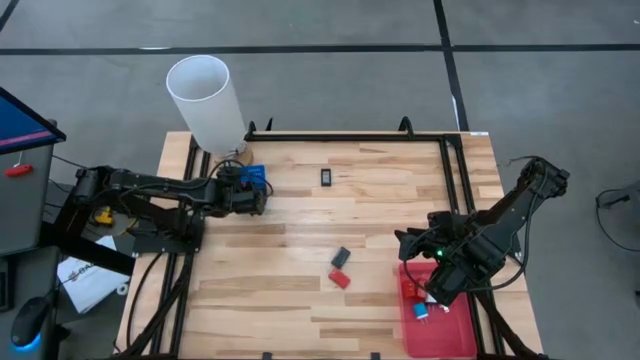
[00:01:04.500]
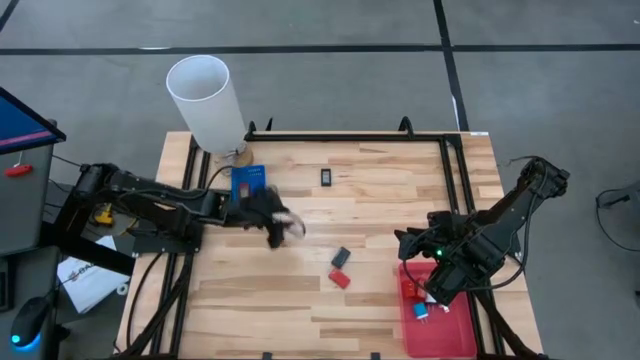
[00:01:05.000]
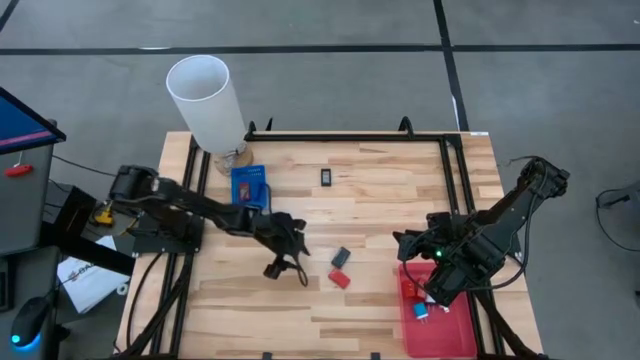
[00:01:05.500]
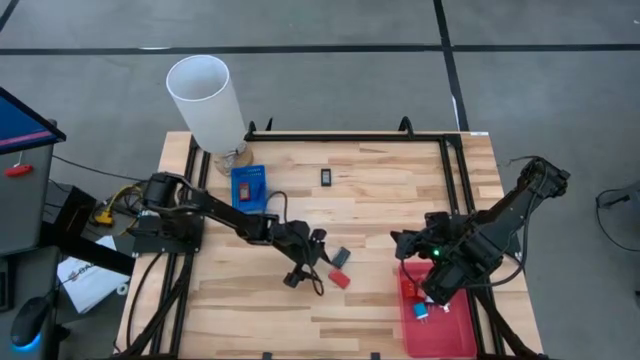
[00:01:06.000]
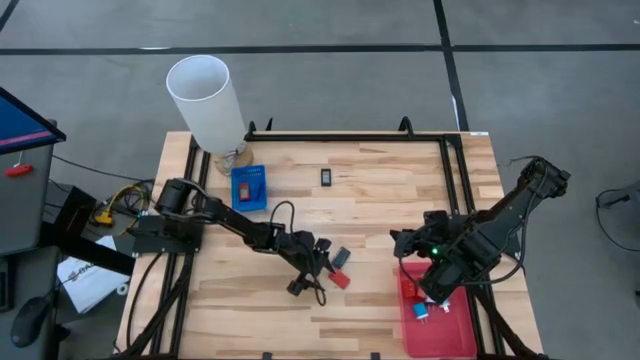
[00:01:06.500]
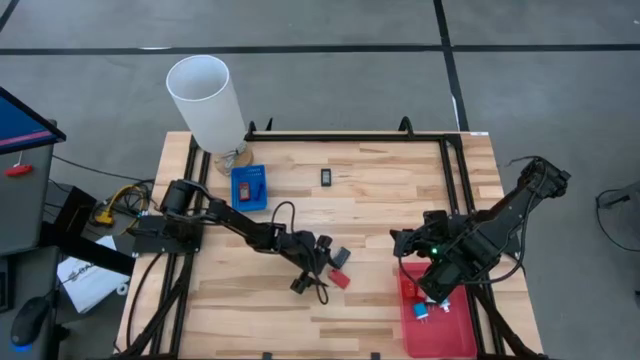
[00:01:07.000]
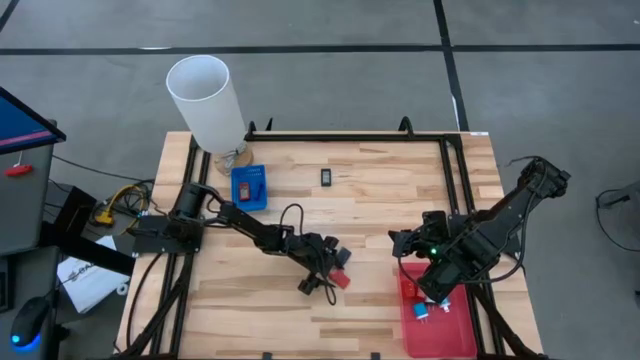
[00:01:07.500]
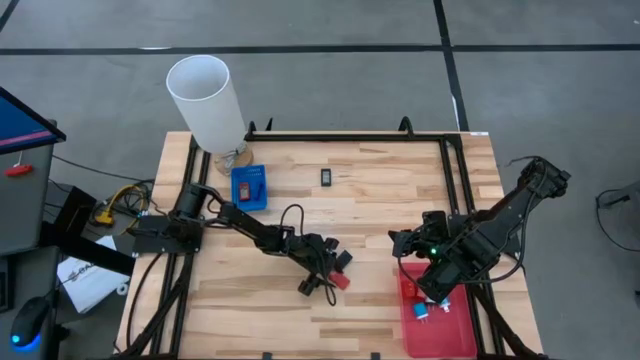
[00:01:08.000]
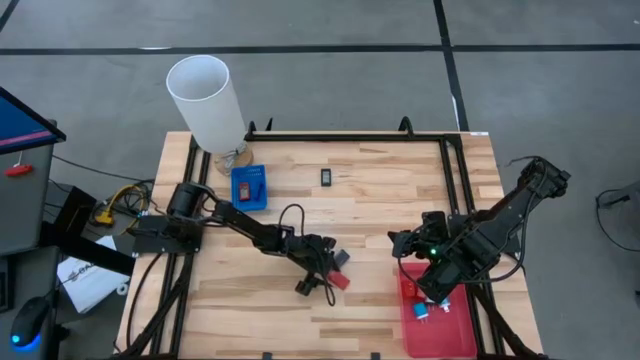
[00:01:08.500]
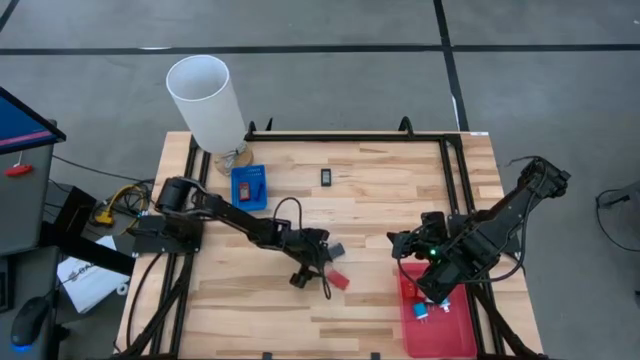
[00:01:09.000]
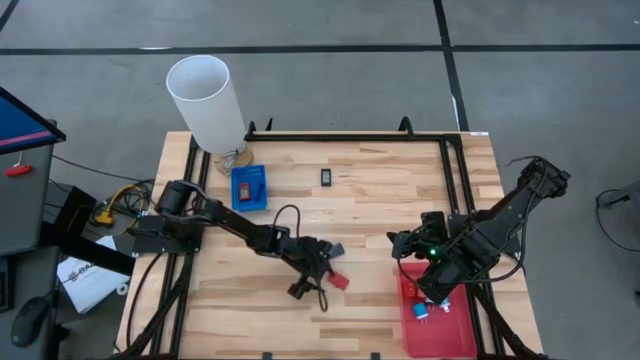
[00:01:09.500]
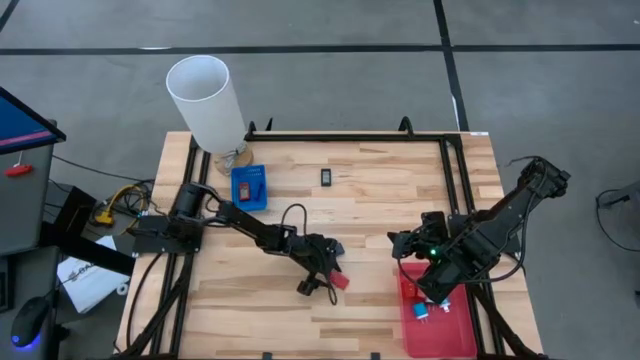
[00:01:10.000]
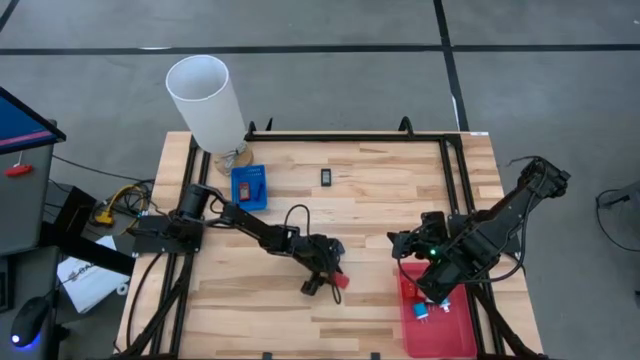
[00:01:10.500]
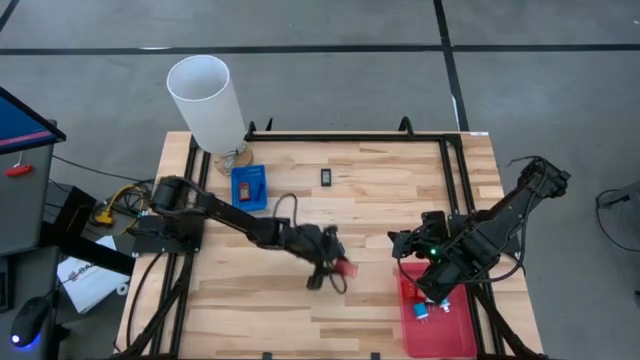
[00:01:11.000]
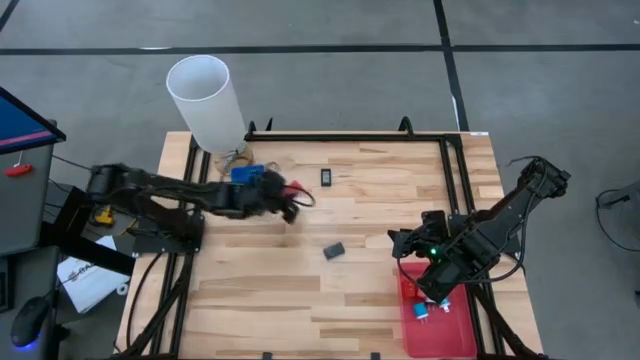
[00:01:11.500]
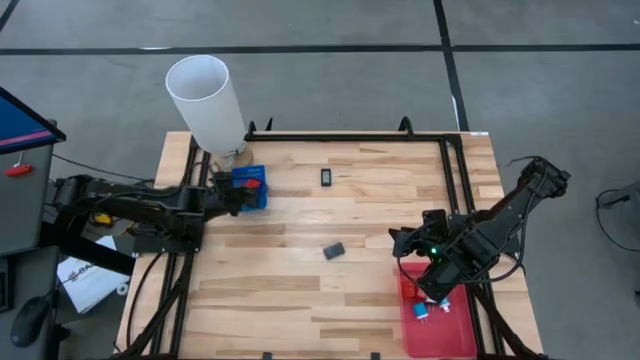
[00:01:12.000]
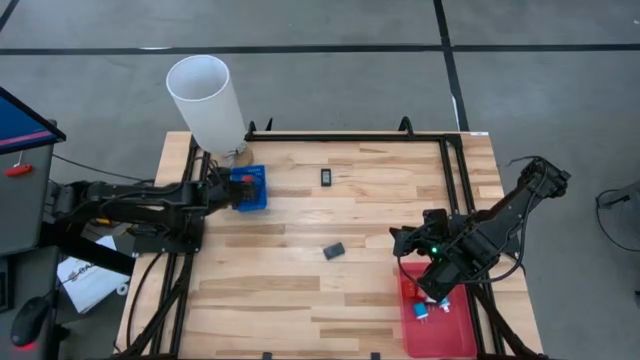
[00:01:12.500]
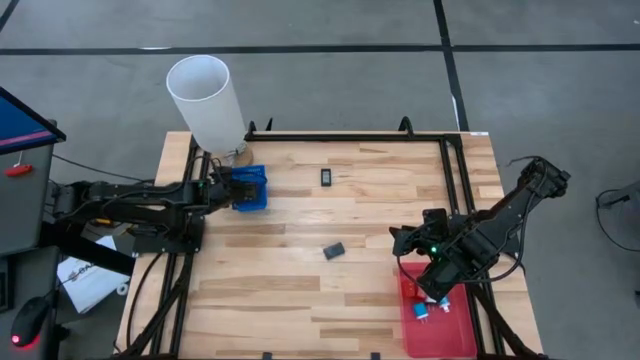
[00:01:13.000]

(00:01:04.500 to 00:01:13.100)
Task: Pick & Place Office items
Put the red digital timer into the blue bin

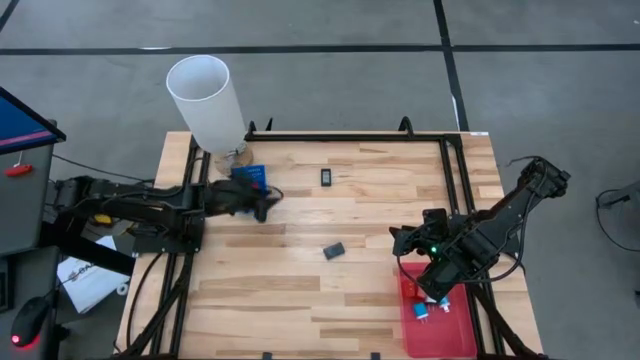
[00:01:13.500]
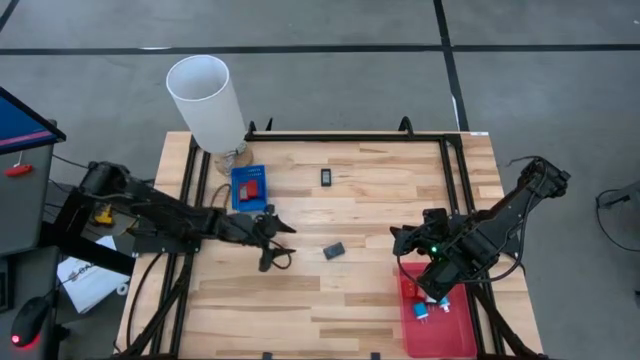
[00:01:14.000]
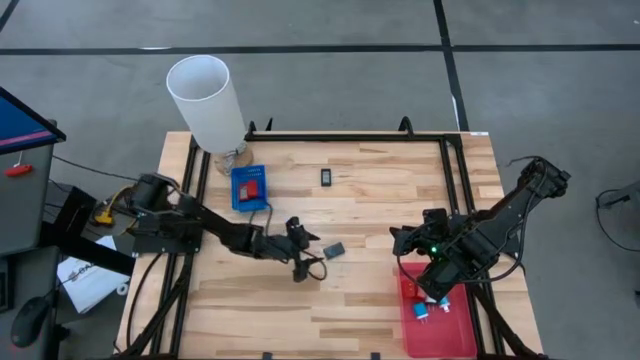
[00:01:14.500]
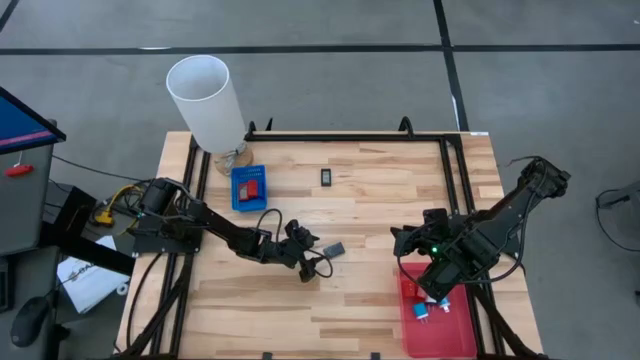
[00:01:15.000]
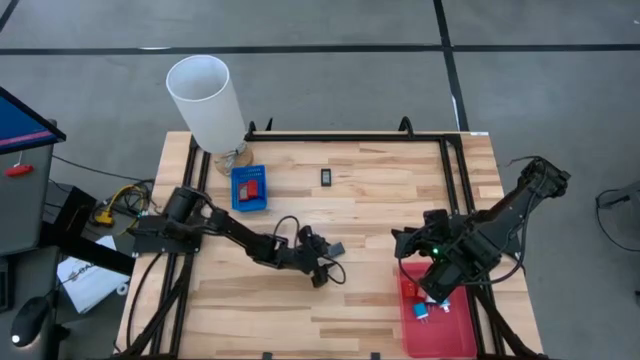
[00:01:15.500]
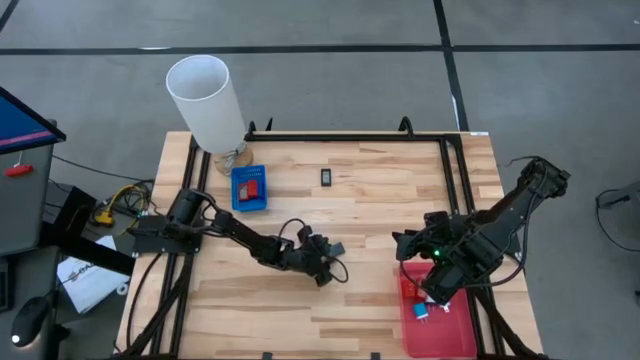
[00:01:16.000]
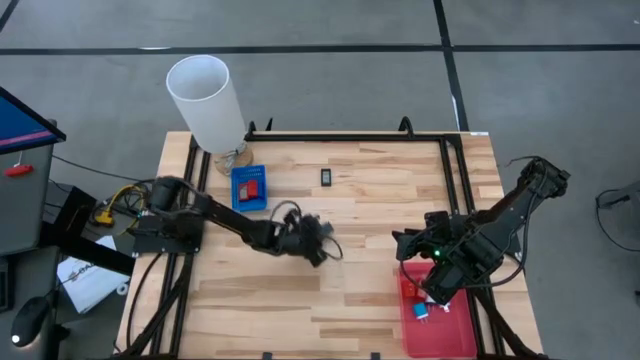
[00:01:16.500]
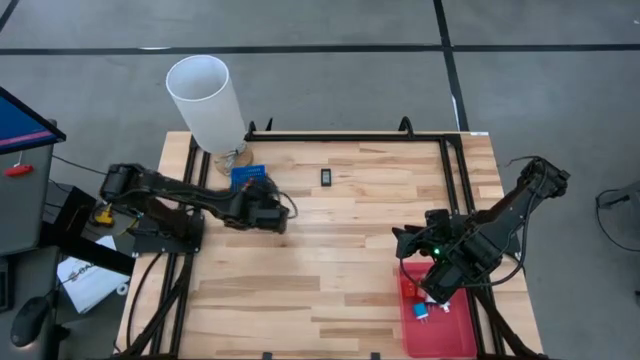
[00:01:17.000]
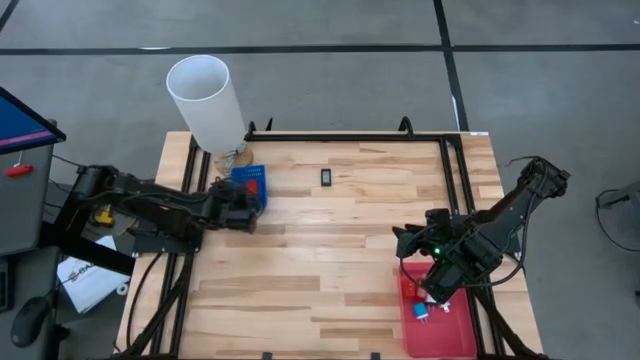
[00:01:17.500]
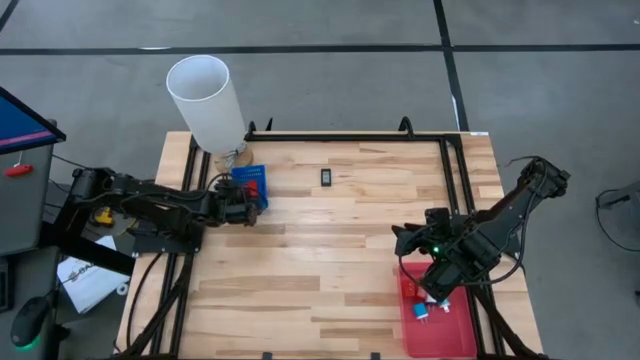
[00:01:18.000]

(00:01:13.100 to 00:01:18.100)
Put the bottom black digital timer into the blue bin

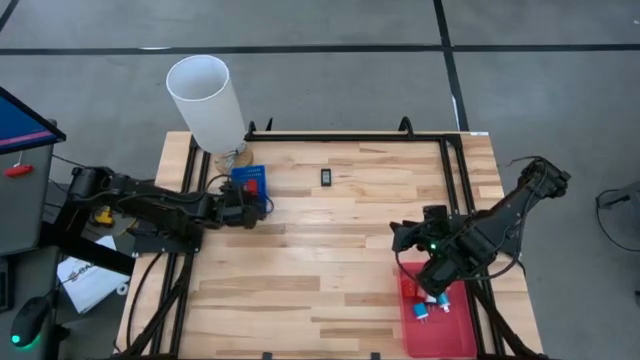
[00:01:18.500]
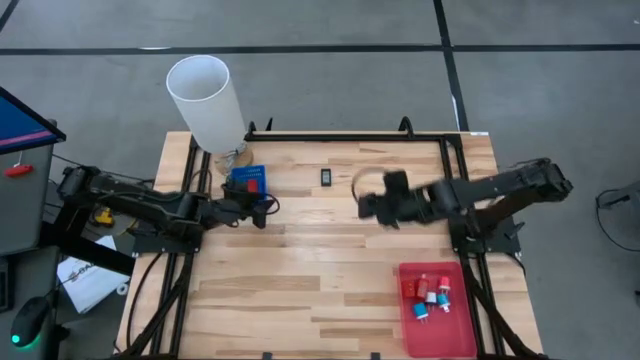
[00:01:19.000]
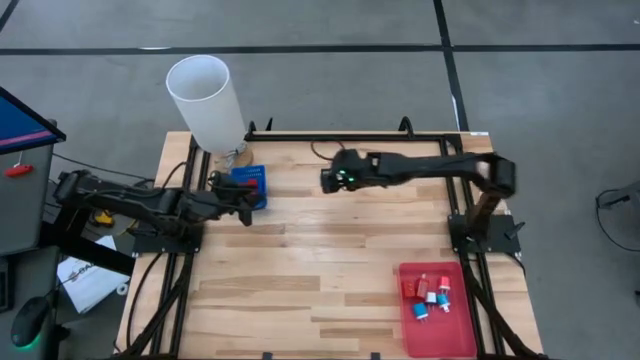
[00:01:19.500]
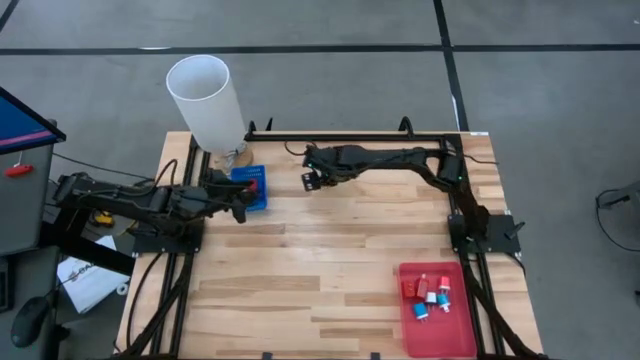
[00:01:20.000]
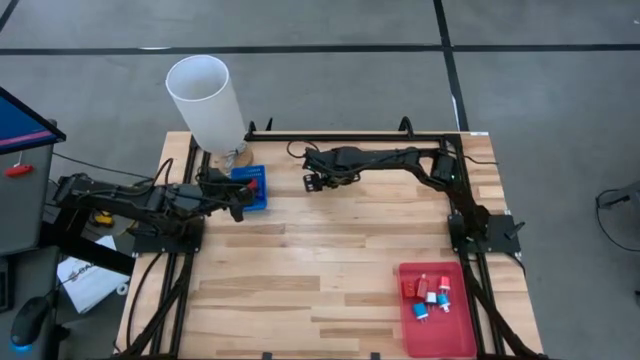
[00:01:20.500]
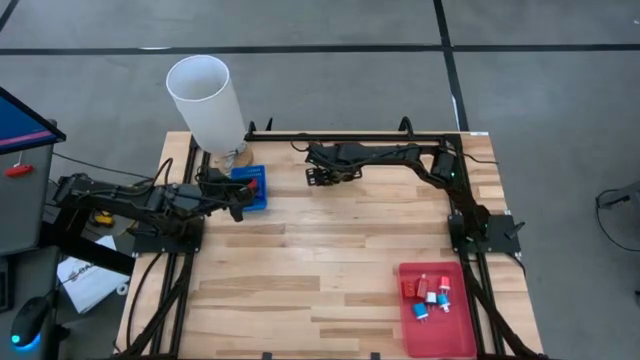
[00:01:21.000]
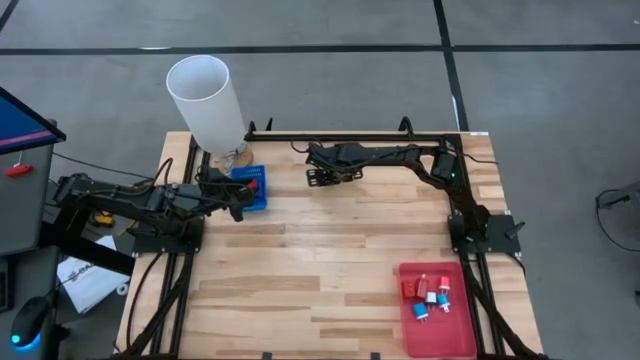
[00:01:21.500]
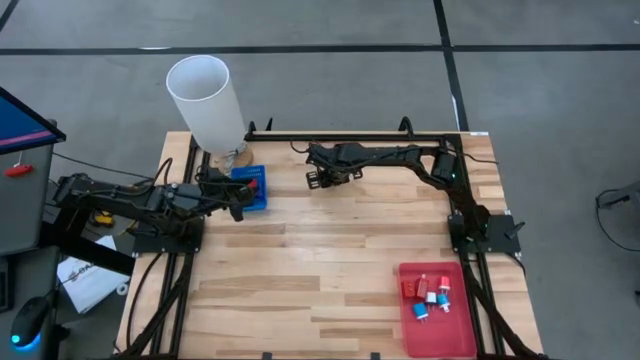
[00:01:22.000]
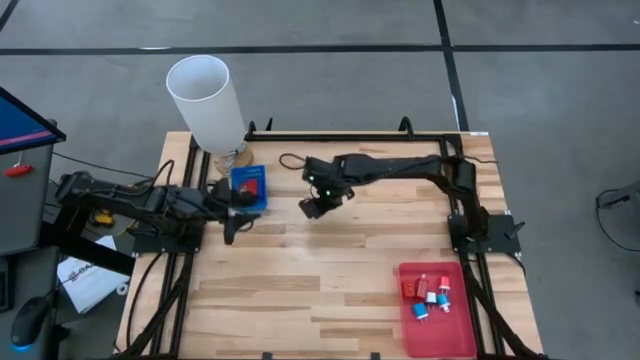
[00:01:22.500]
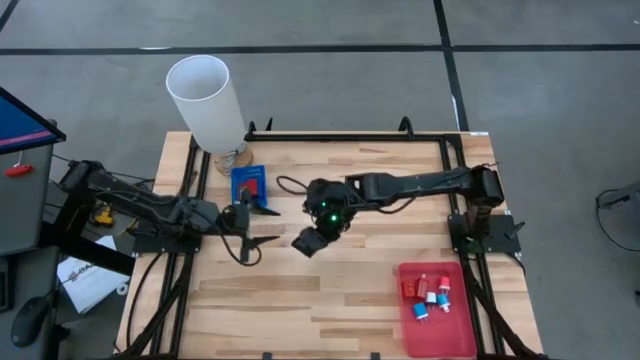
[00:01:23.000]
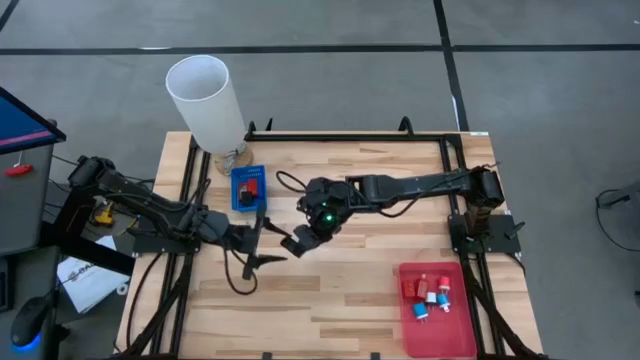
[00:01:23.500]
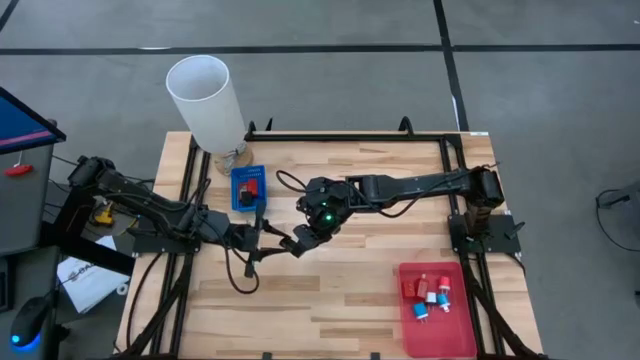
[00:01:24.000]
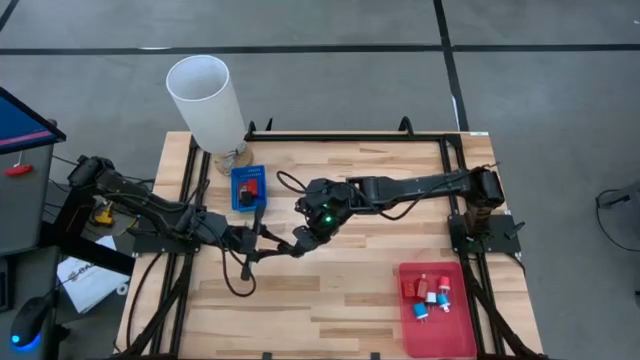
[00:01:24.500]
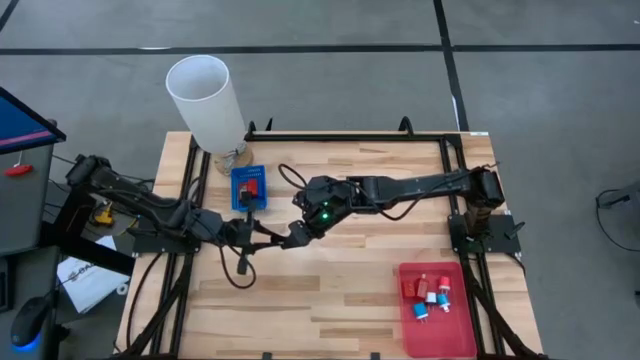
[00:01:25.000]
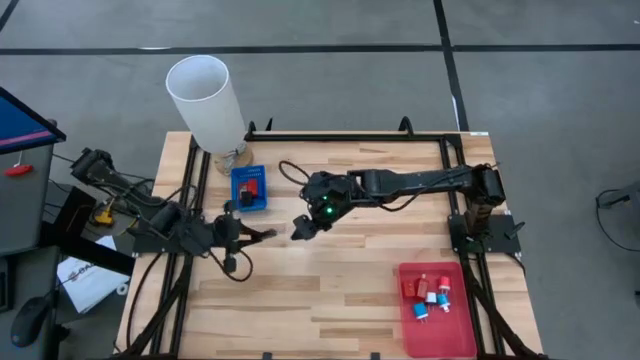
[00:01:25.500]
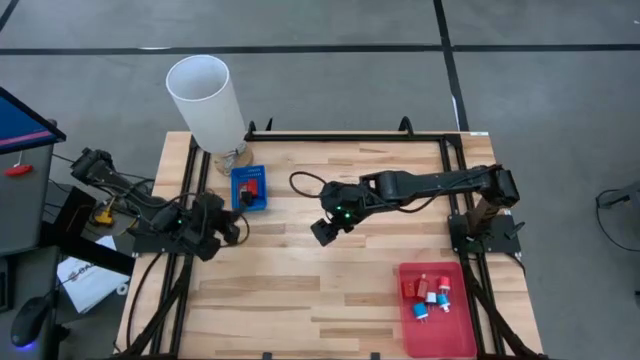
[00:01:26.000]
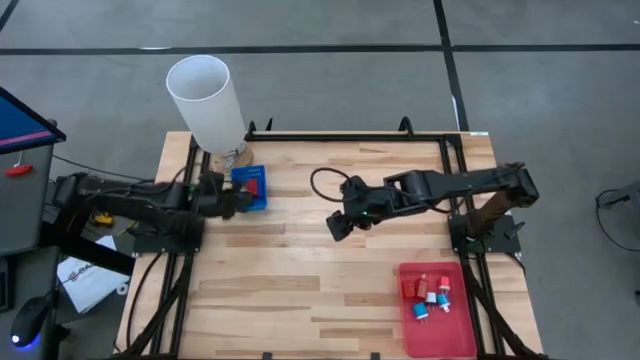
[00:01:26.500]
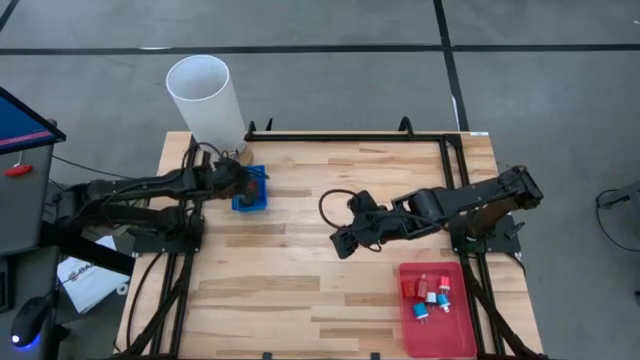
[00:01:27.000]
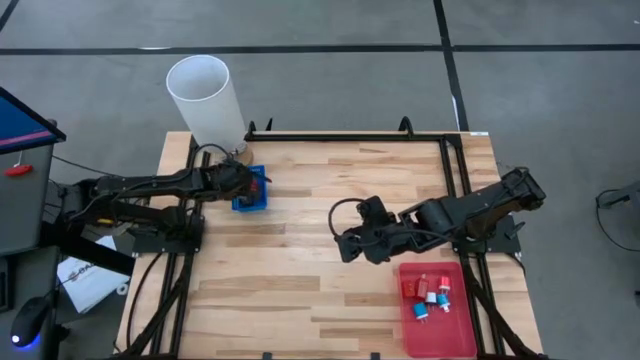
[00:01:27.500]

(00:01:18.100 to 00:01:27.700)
Put the black digital timer into the blue bin
